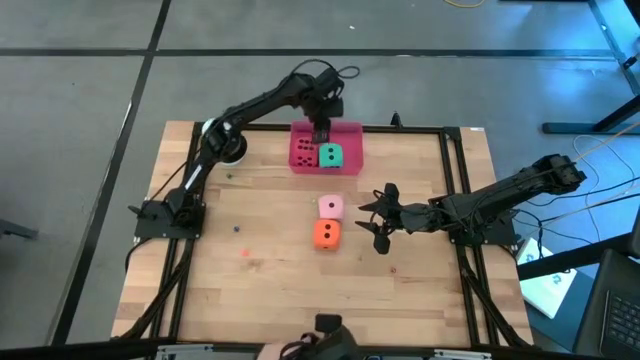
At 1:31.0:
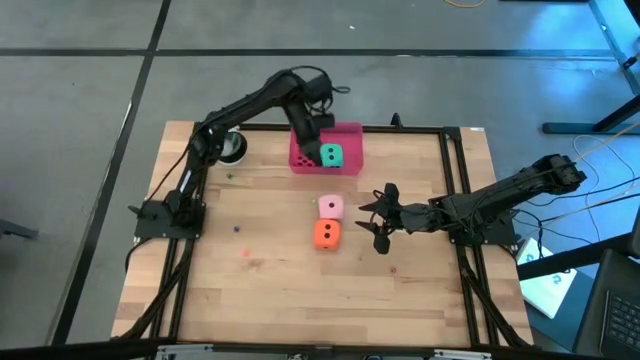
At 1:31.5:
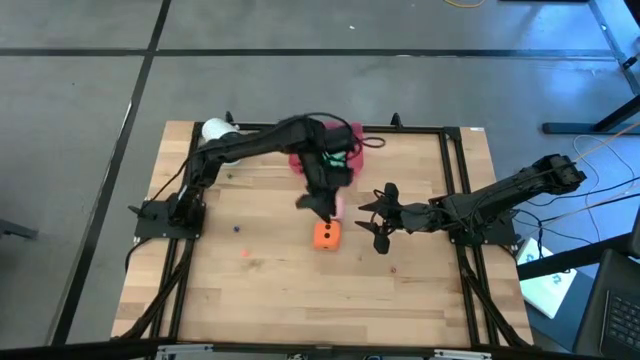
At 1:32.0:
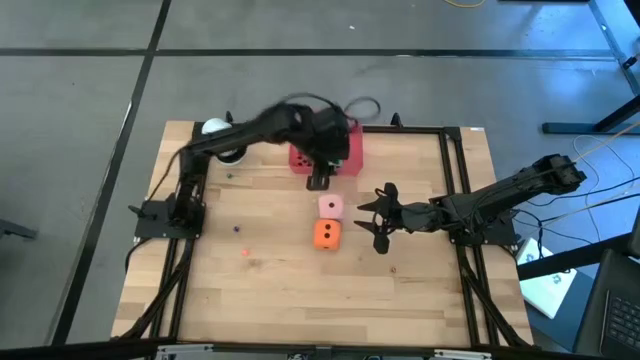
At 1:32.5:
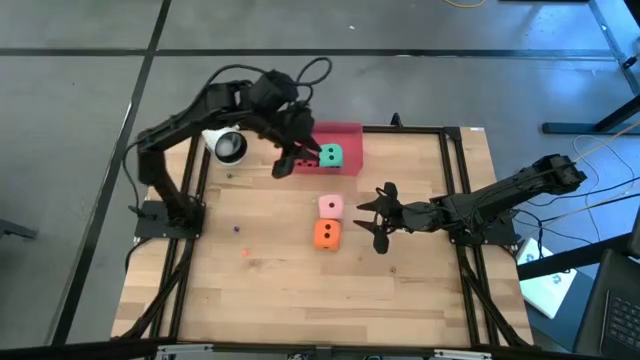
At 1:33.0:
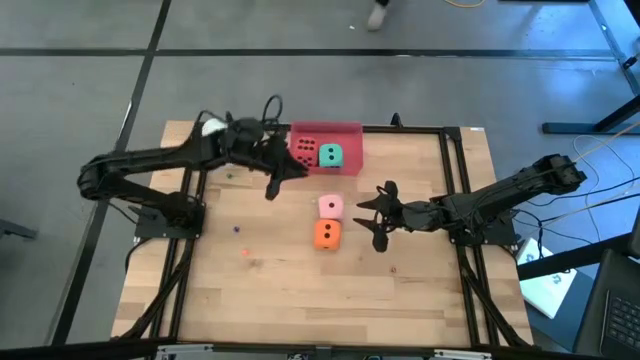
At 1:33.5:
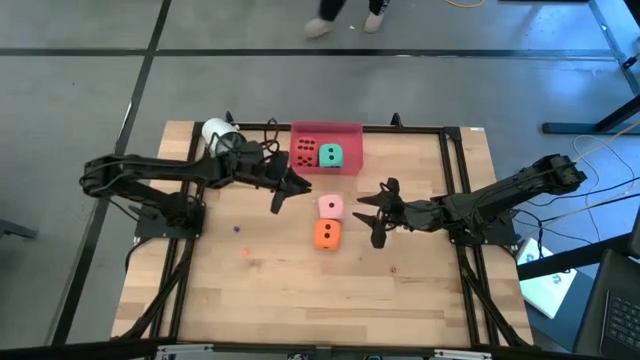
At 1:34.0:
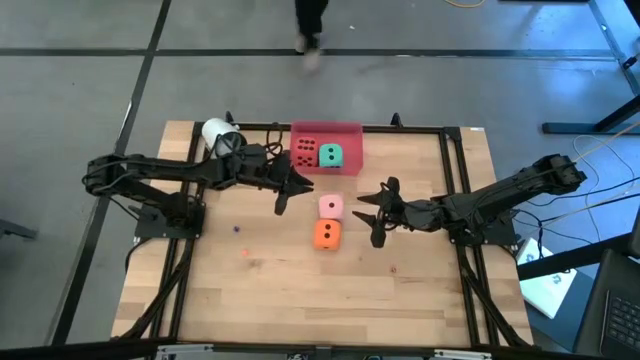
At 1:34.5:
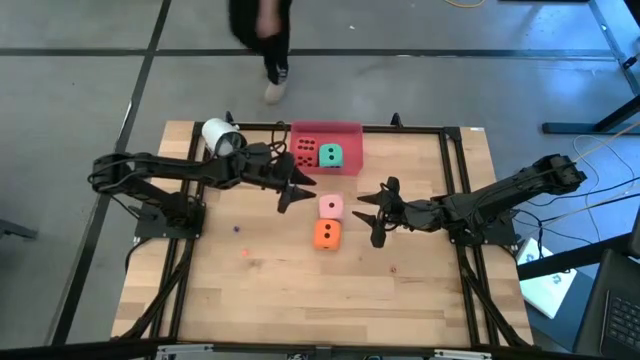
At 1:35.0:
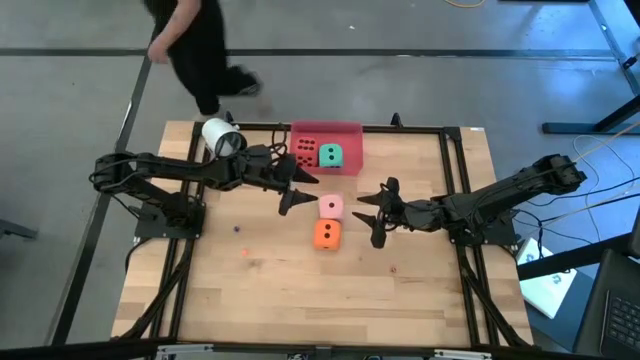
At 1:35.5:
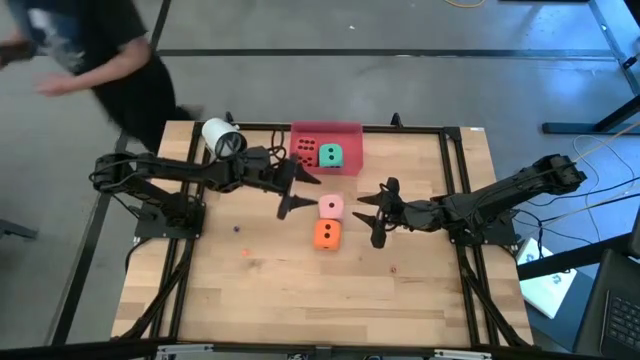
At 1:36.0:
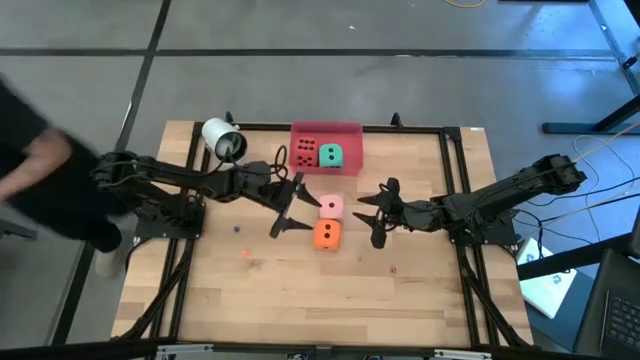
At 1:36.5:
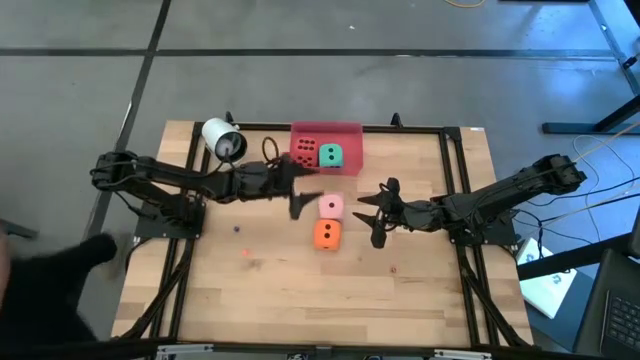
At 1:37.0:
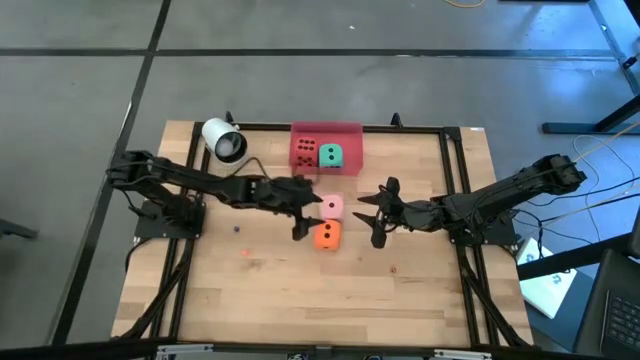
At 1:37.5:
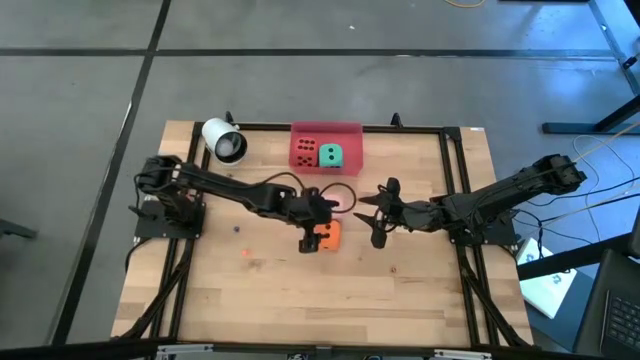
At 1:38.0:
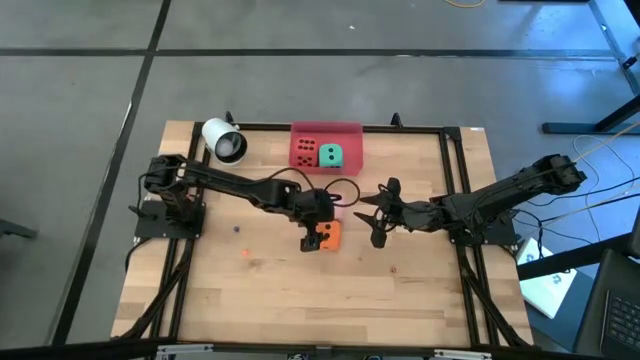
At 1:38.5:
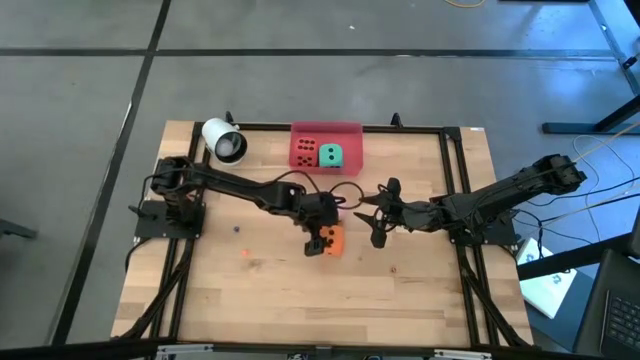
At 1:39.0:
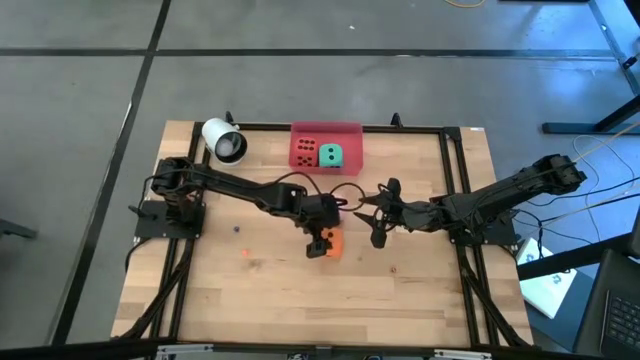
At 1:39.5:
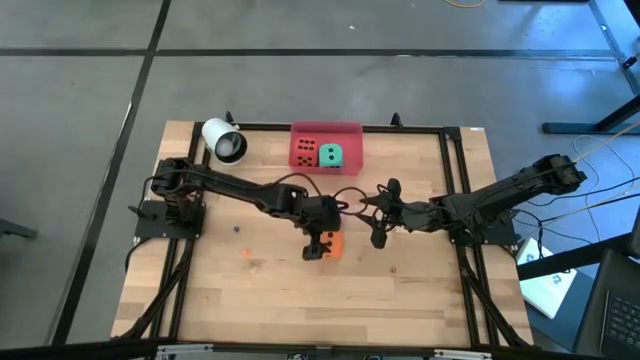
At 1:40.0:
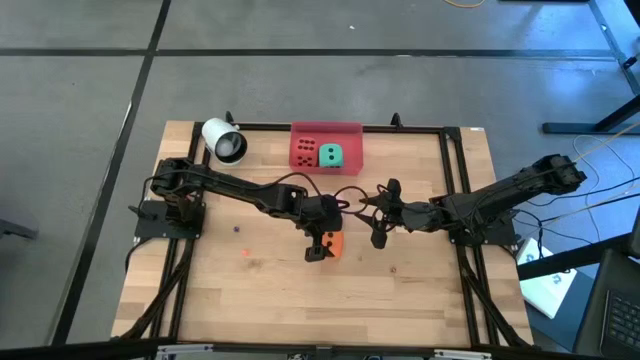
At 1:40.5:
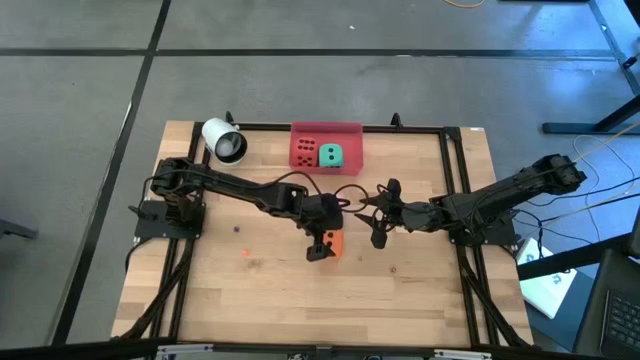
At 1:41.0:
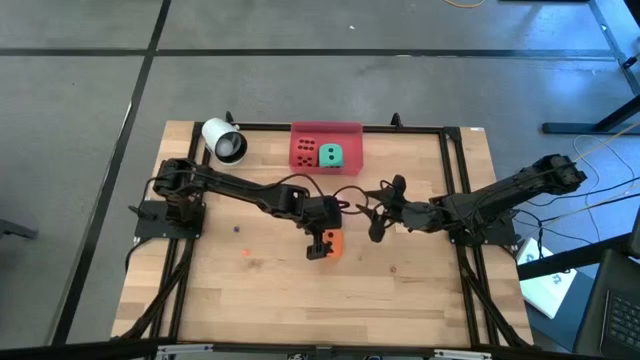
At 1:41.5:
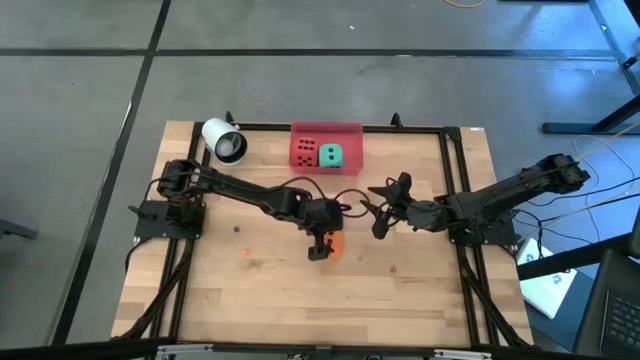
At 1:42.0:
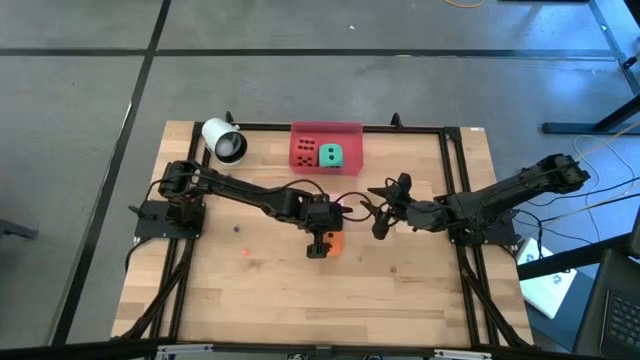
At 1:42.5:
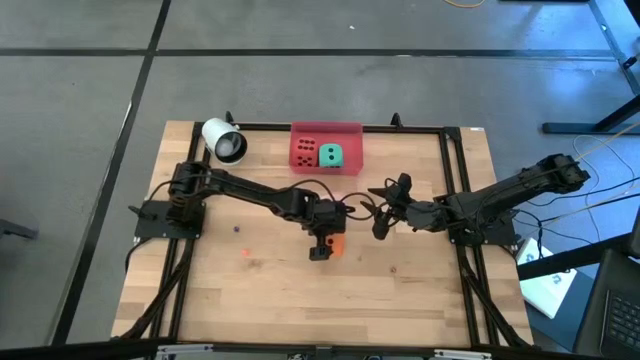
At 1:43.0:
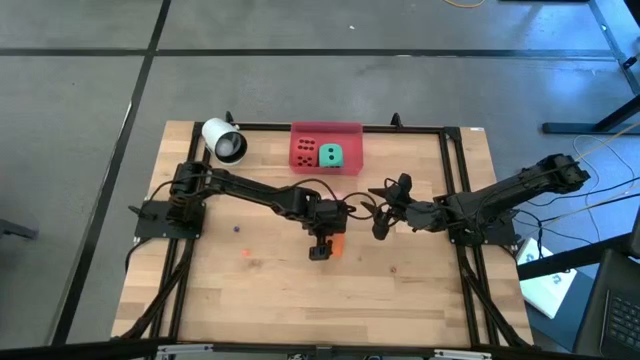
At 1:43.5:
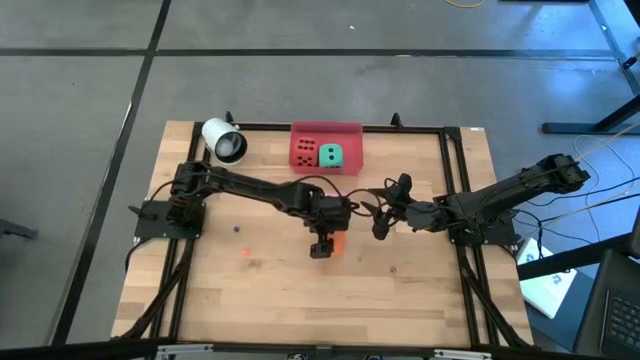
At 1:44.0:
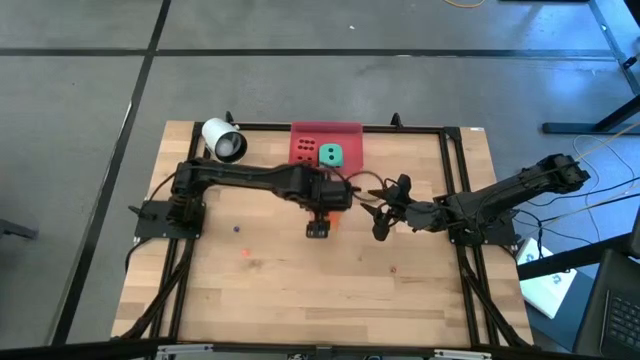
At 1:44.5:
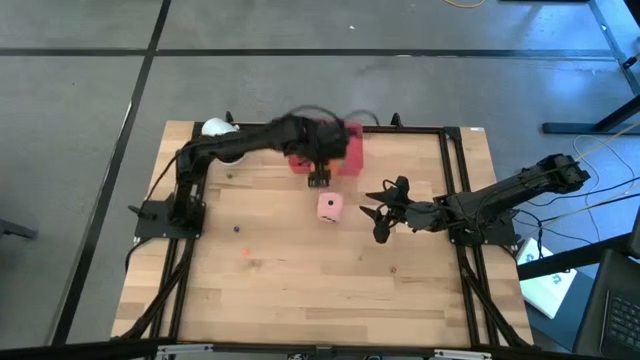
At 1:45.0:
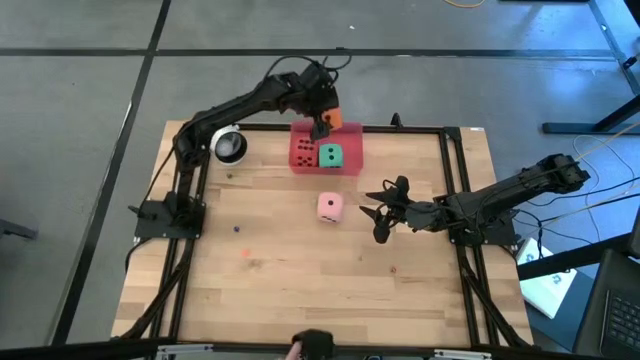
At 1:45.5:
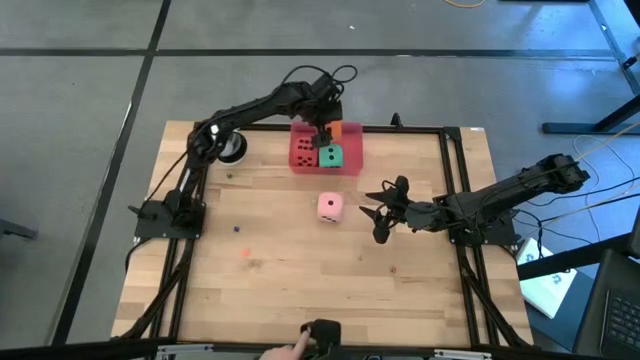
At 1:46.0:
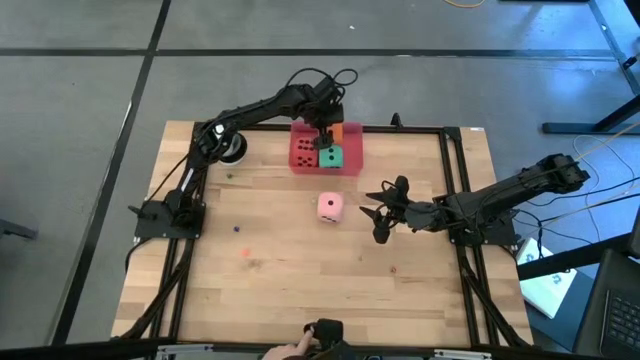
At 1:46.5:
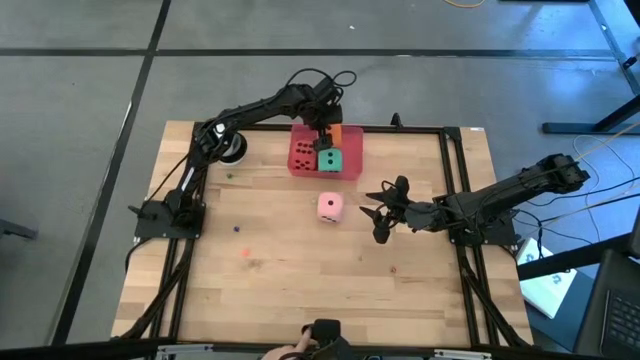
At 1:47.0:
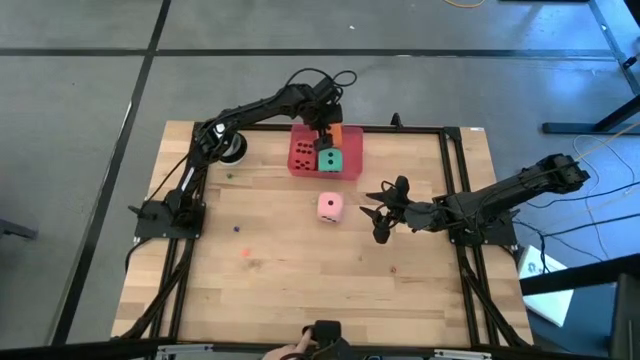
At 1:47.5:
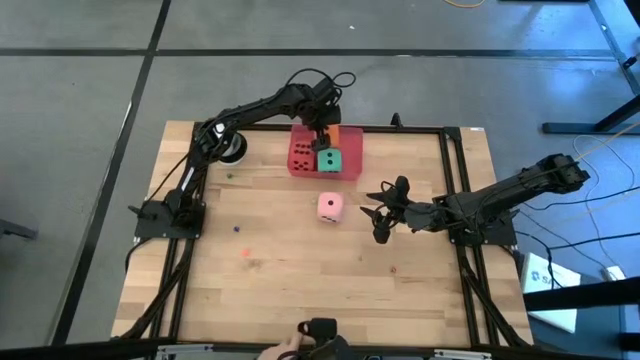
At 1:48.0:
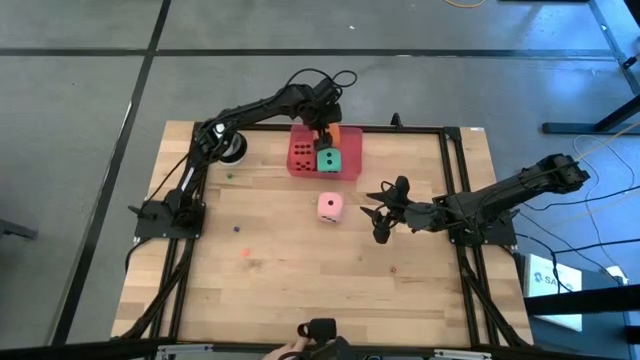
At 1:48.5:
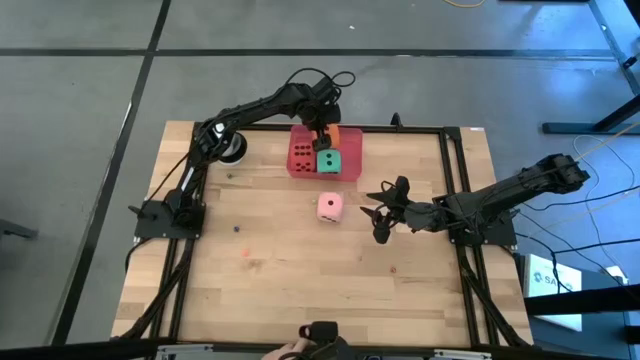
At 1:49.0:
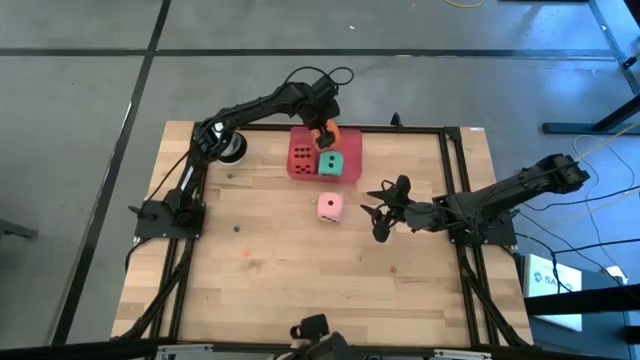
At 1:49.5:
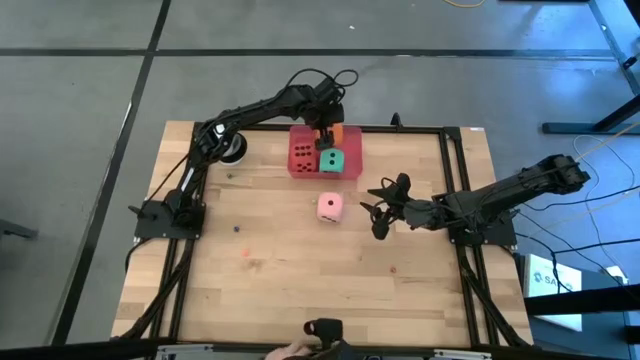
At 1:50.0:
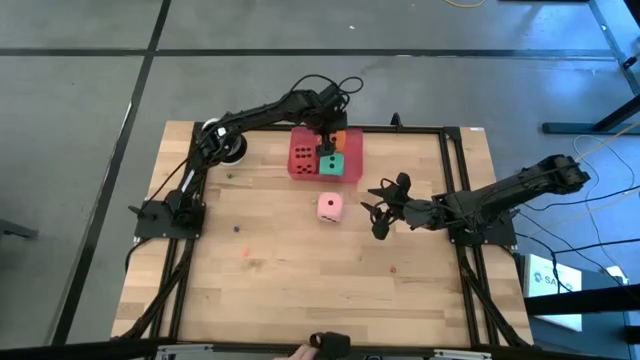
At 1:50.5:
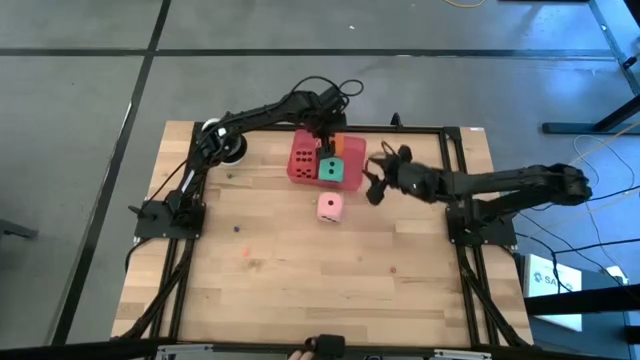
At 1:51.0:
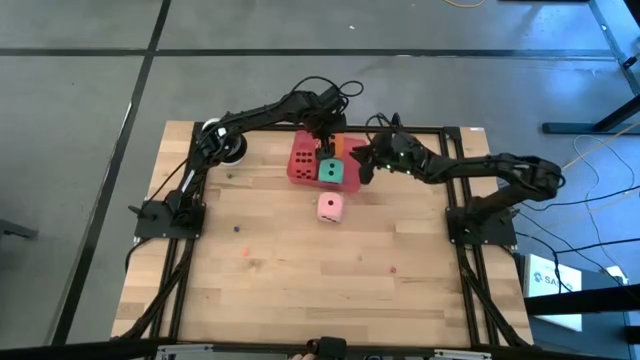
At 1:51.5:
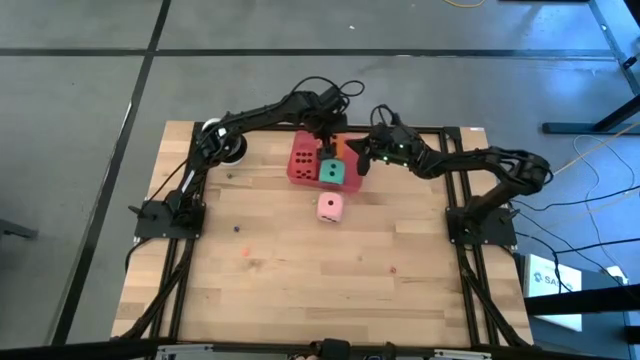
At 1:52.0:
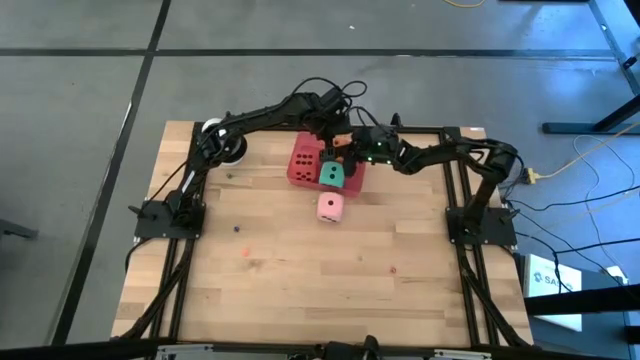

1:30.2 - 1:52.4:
Task: Pick & Place Dice
Put the right orange die into the pink bin
